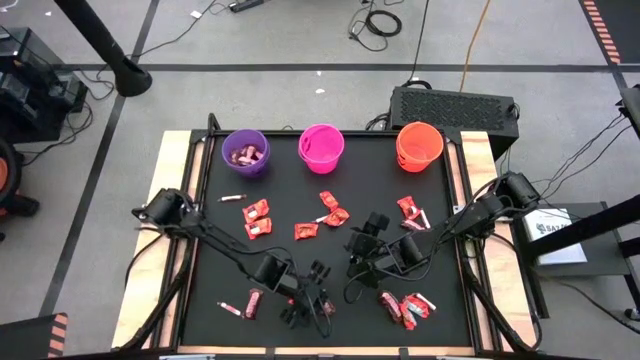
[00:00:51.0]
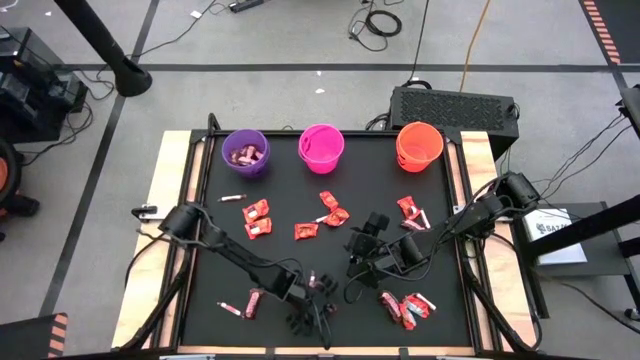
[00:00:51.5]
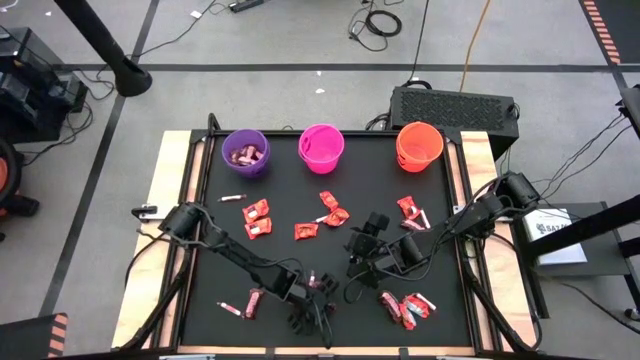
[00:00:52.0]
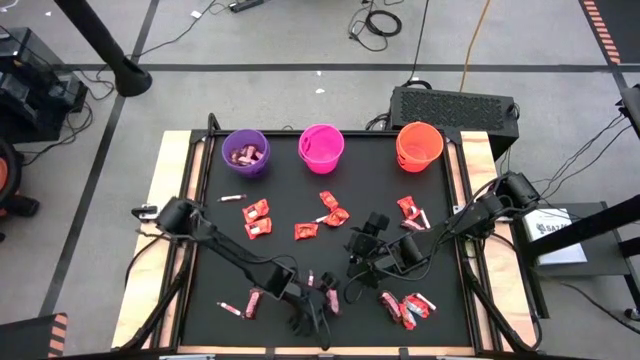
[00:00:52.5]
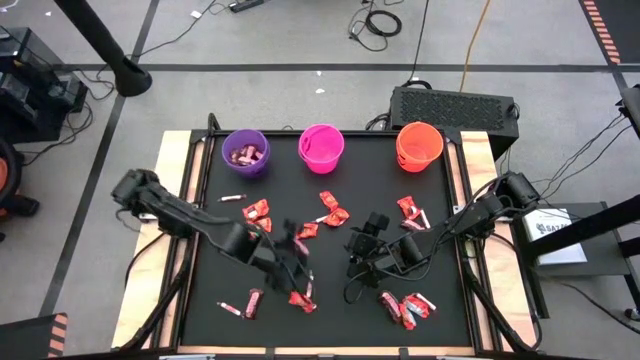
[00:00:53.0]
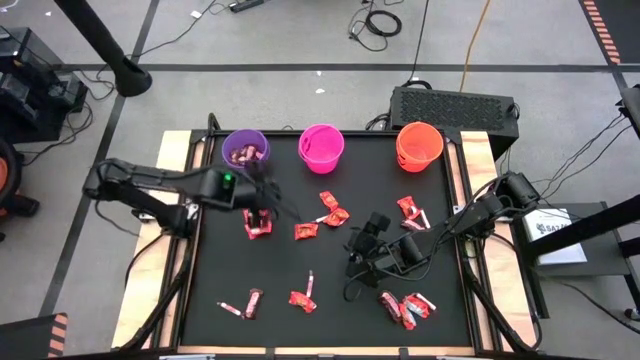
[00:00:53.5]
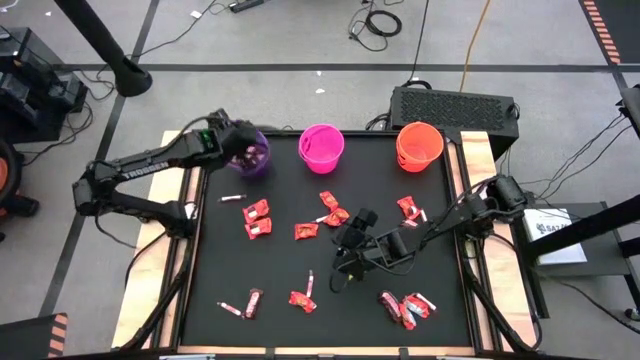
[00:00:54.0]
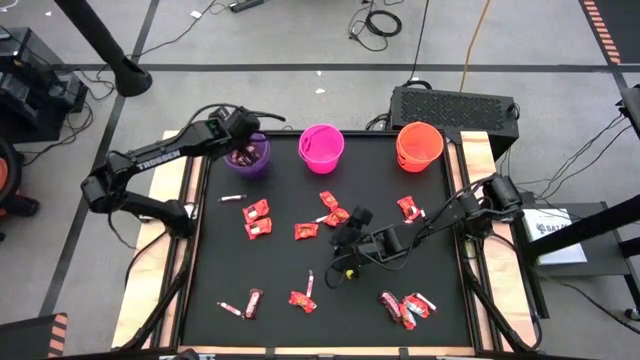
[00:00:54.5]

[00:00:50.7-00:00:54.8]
Task: Sort candy by brand, put in halloween buckets
Put the brown chocolate bar into the purple bucket

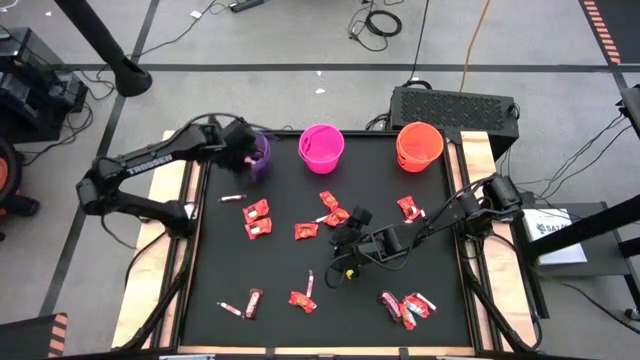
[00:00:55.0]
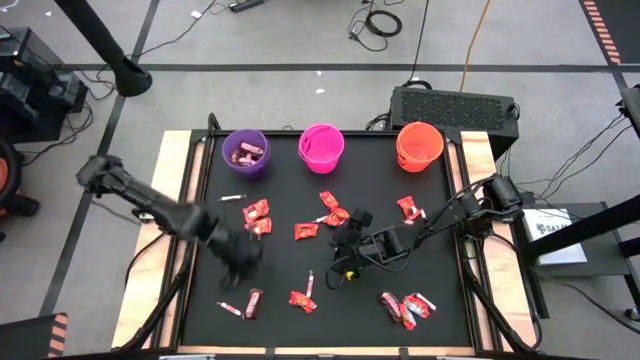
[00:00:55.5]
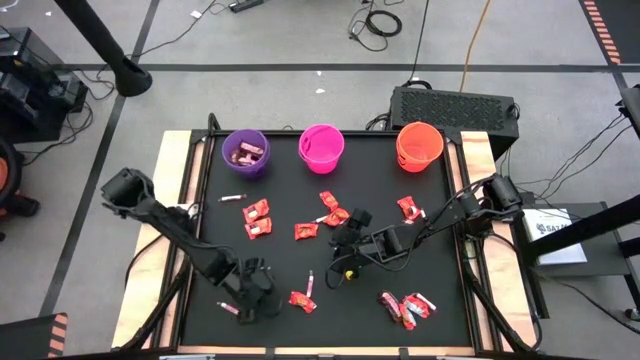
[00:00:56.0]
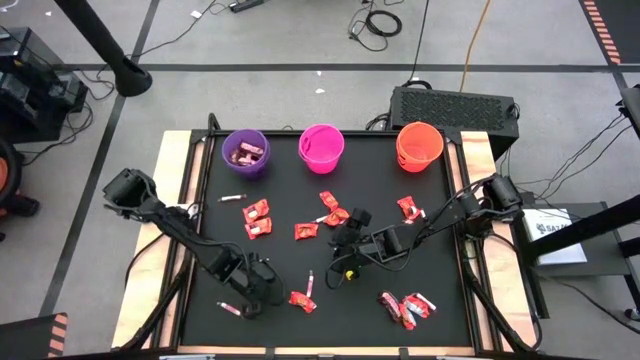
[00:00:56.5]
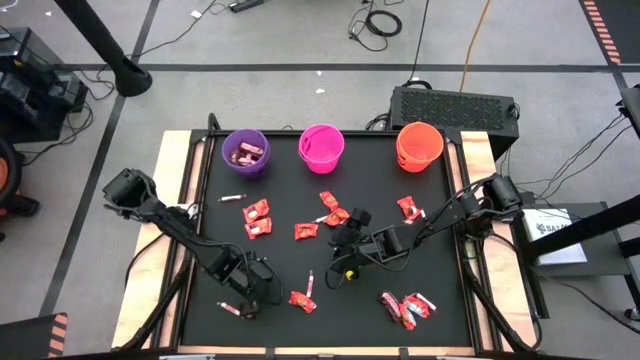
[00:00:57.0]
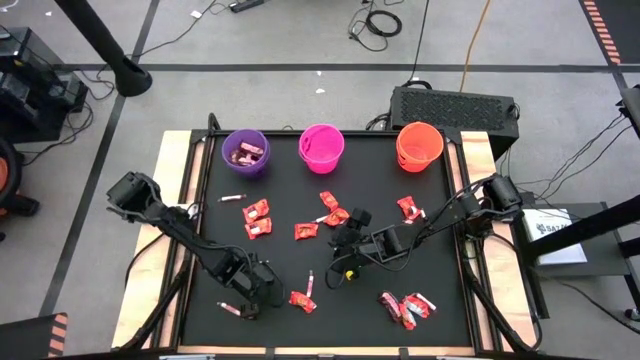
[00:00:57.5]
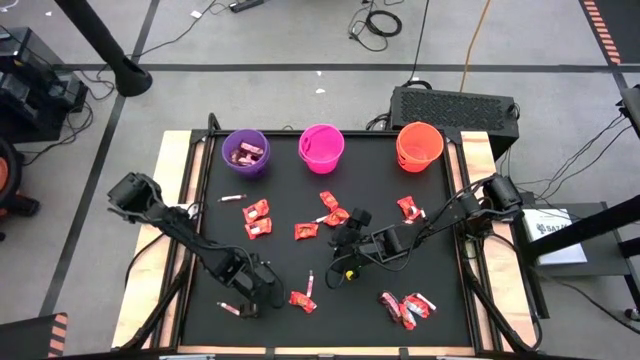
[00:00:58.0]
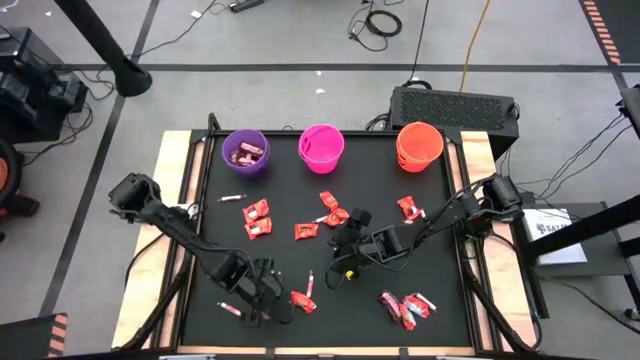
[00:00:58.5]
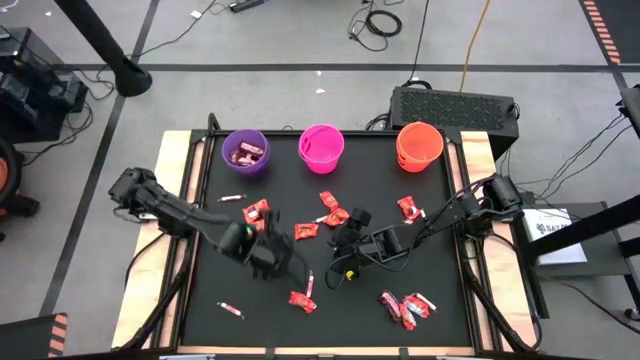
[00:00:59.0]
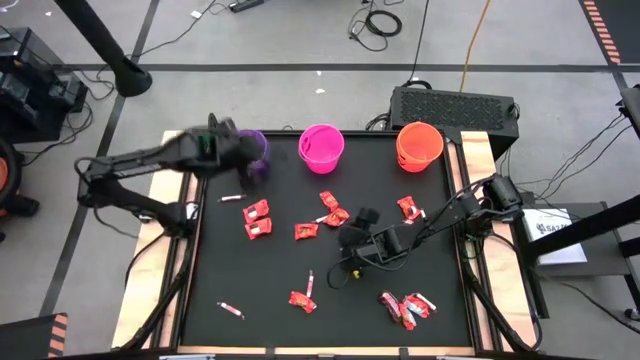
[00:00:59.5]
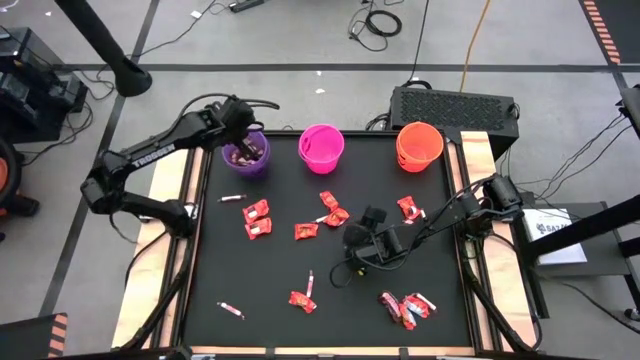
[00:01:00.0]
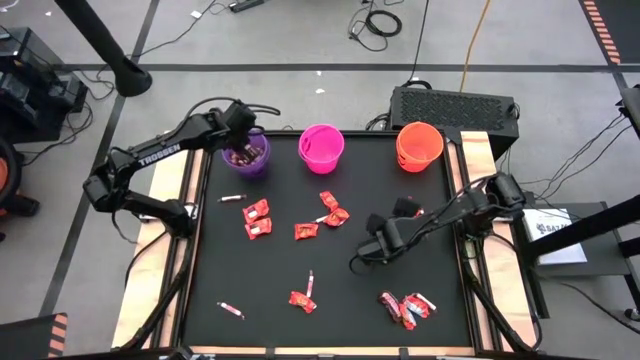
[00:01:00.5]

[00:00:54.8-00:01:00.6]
Put the brown chocolate bar into the purple bucket

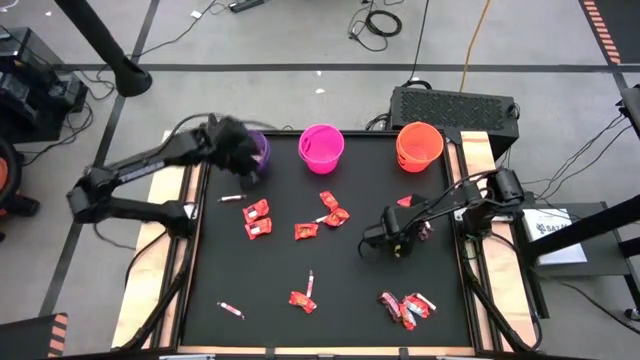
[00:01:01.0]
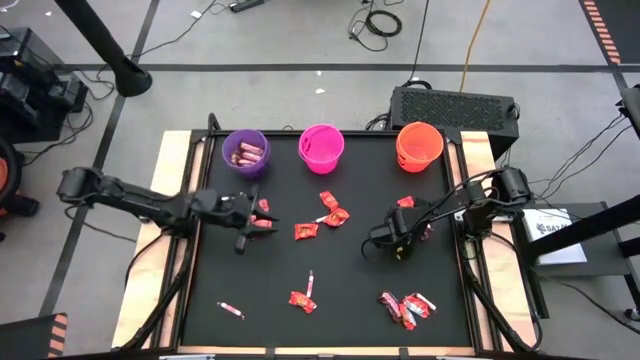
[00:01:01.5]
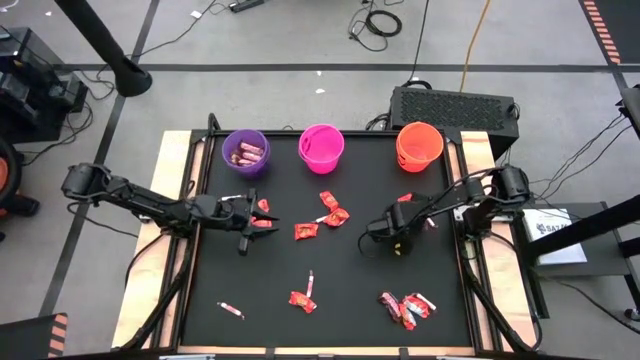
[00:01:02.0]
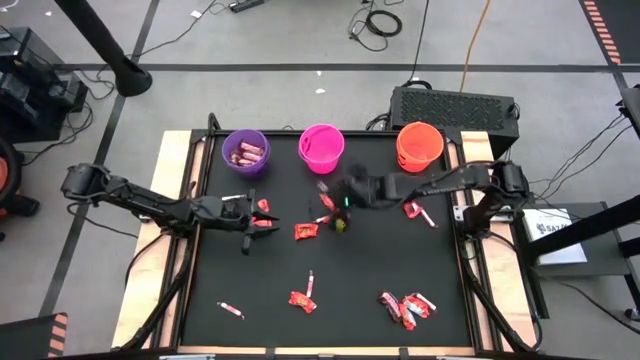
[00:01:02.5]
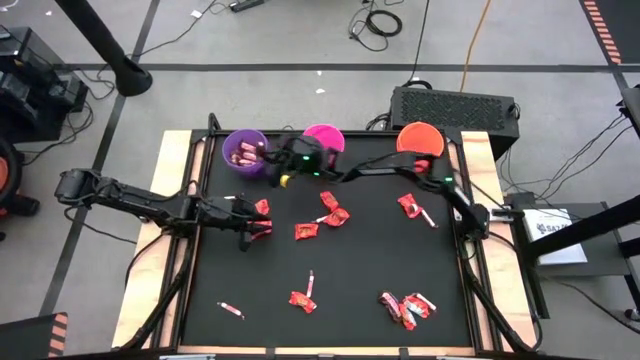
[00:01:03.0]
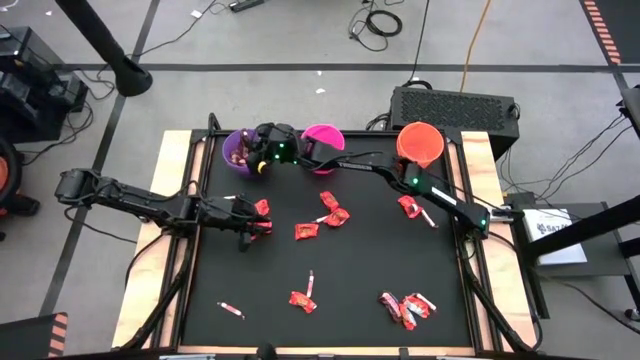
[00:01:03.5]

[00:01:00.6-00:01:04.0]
Put the brown chocolate bar into the purple bucket

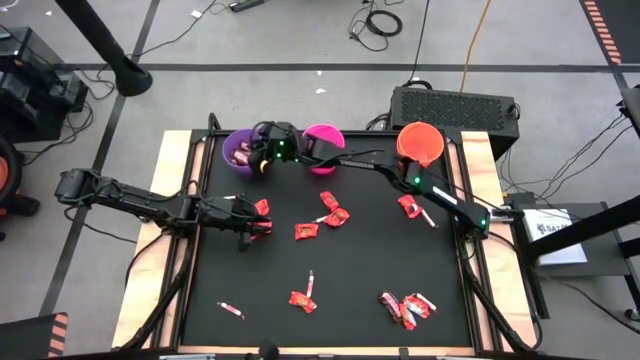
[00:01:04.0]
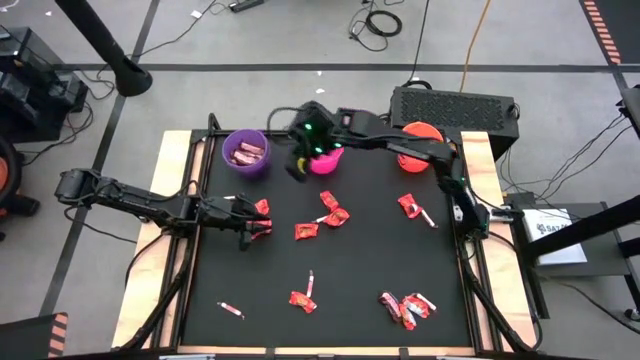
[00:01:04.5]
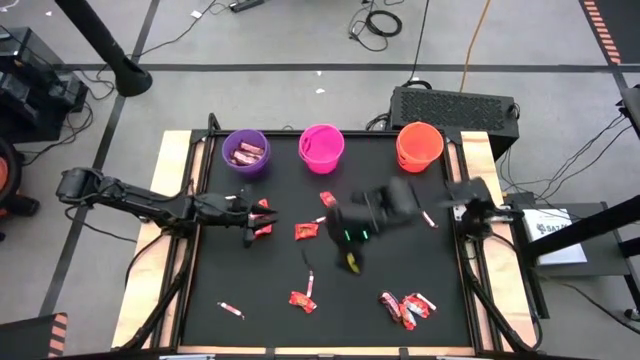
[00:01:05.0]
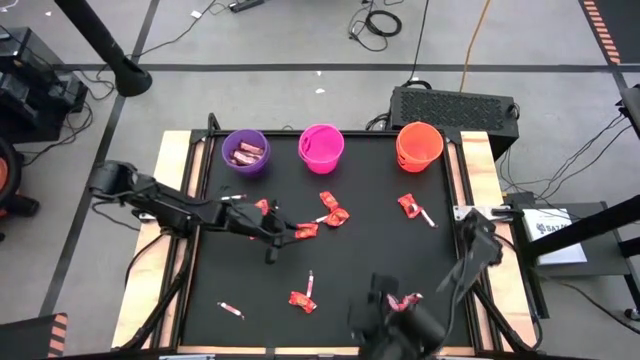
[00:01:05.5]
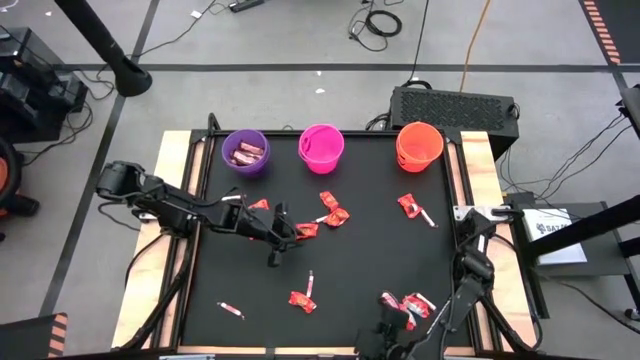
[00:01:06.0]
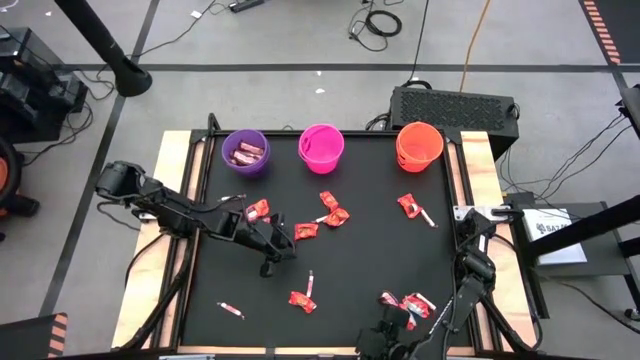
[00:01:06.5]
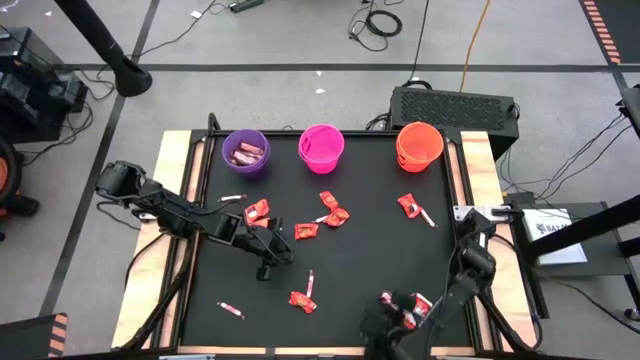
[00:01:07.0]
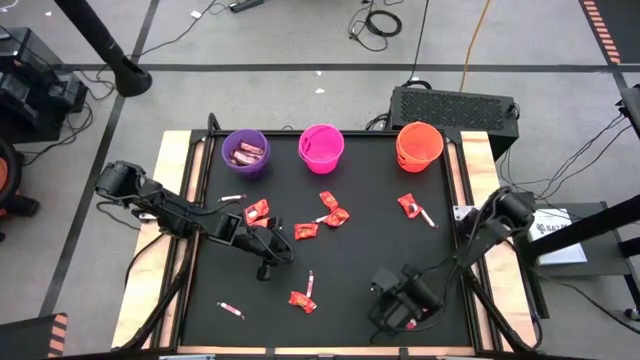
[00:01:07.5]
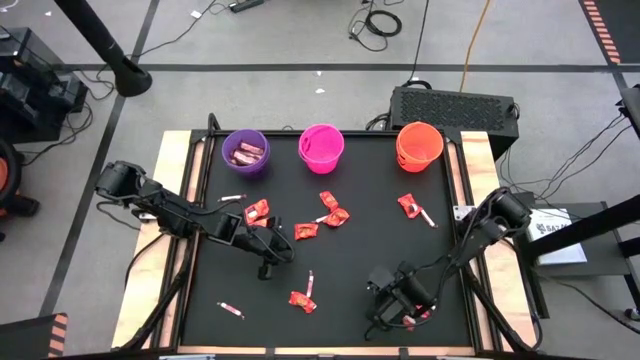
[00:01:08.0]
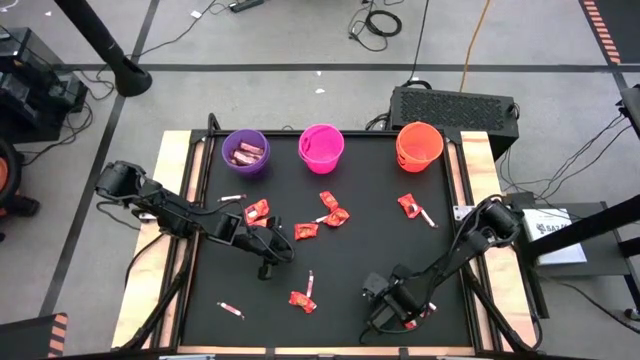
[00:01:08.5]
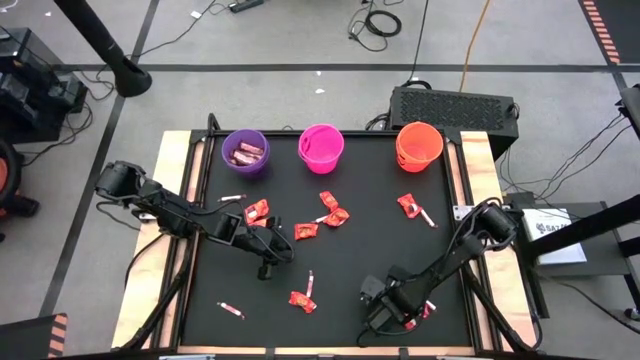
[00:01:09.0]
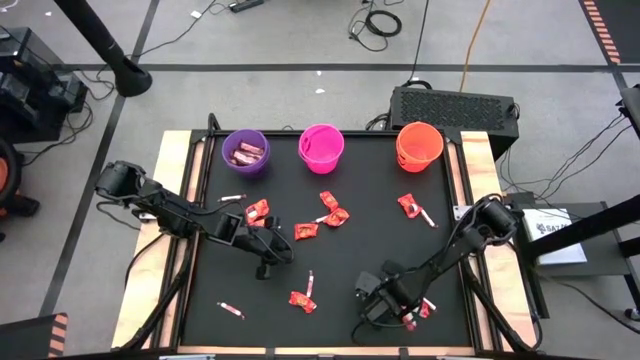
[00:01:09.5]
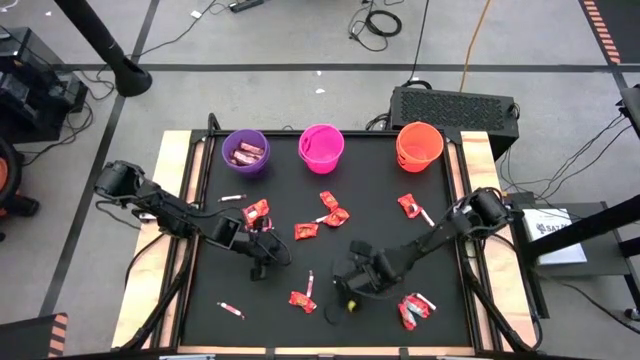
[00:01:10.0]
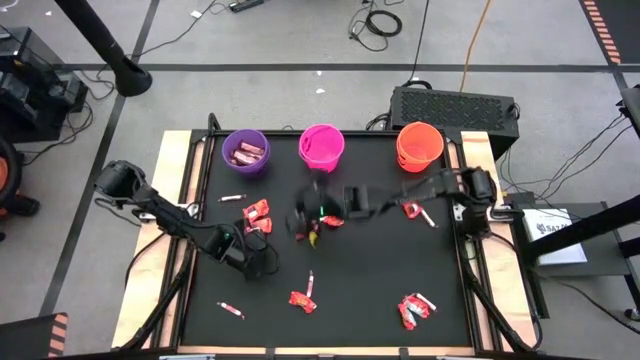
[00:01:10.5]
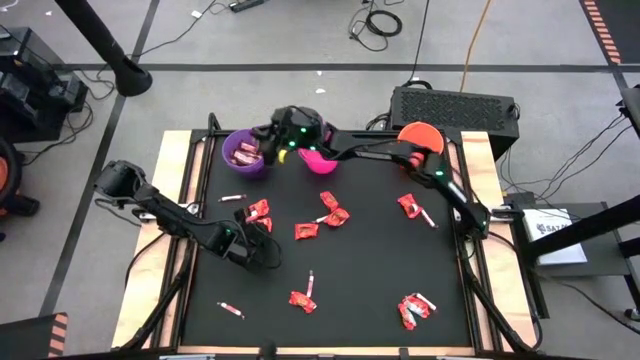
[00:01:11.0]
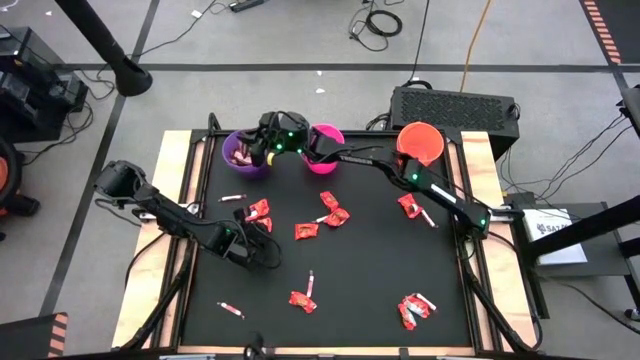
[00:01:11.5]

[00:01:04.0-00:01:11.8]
Put the brown chocolate bar into the purple bucket
